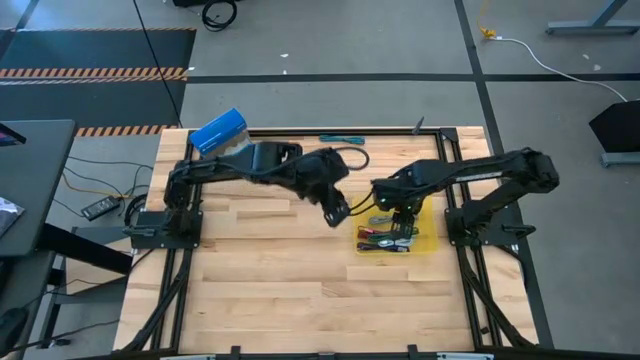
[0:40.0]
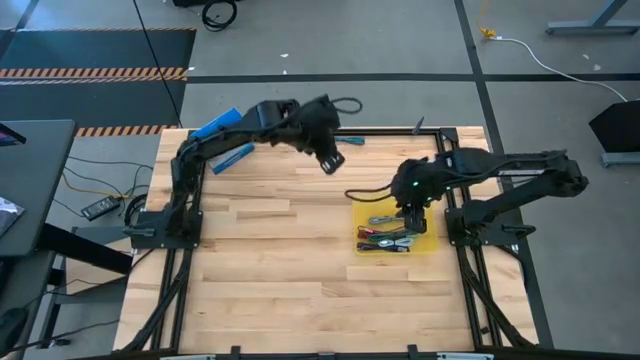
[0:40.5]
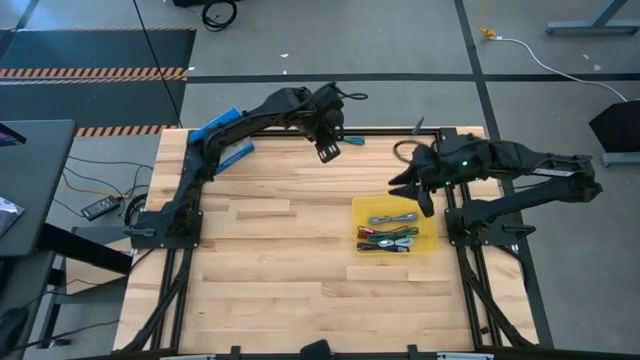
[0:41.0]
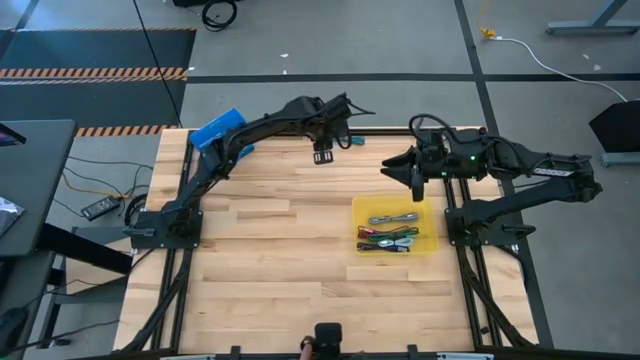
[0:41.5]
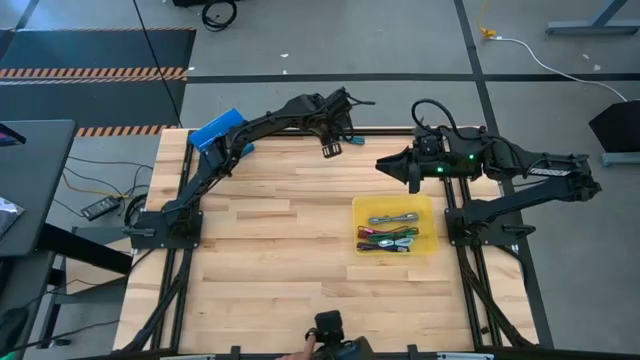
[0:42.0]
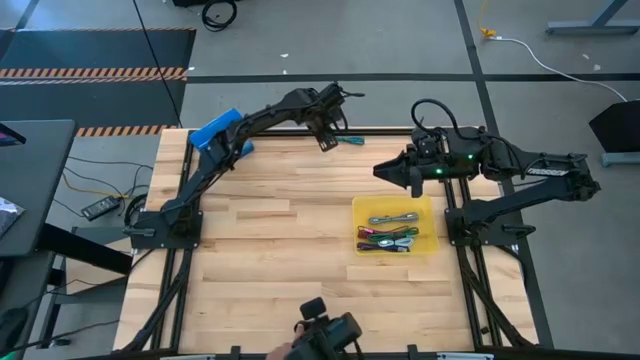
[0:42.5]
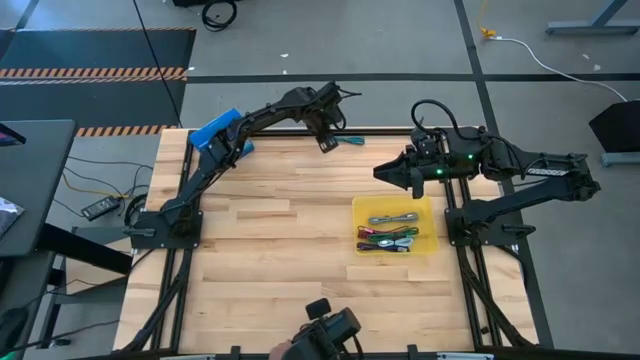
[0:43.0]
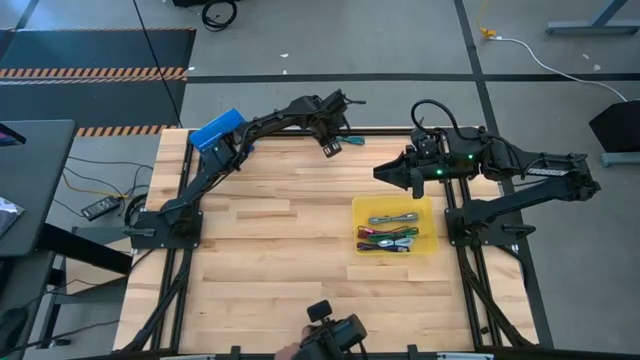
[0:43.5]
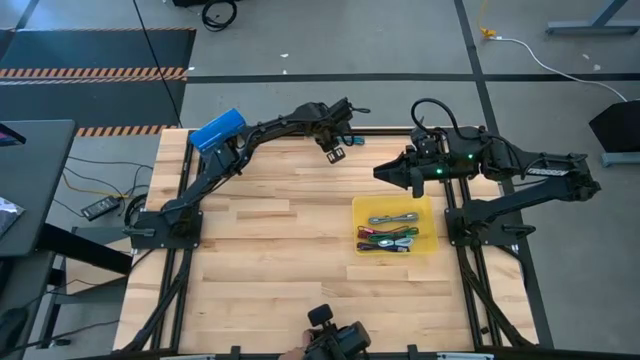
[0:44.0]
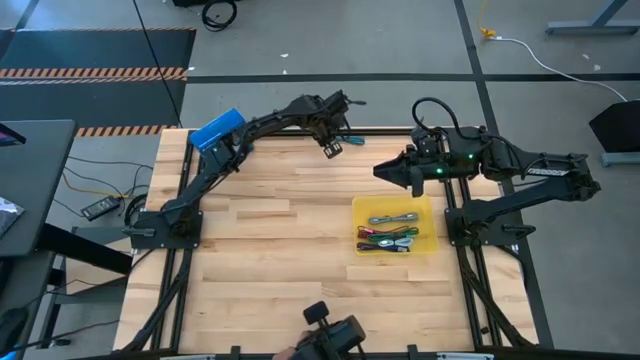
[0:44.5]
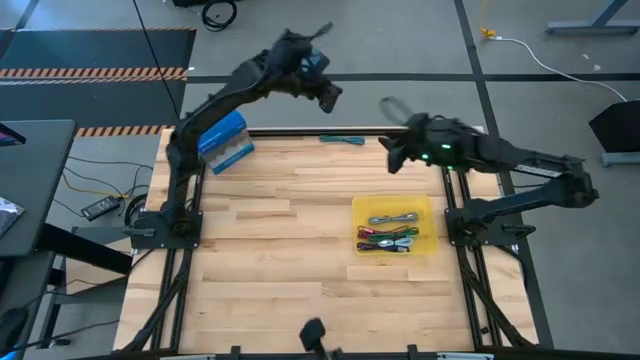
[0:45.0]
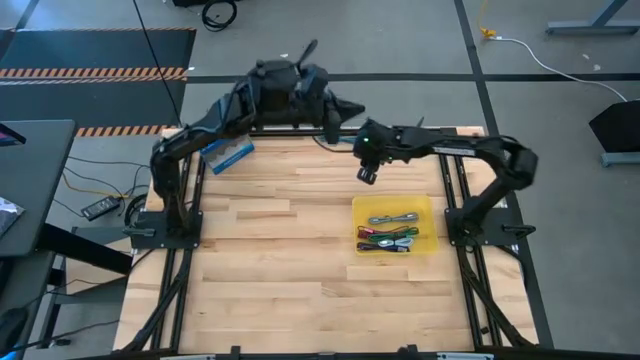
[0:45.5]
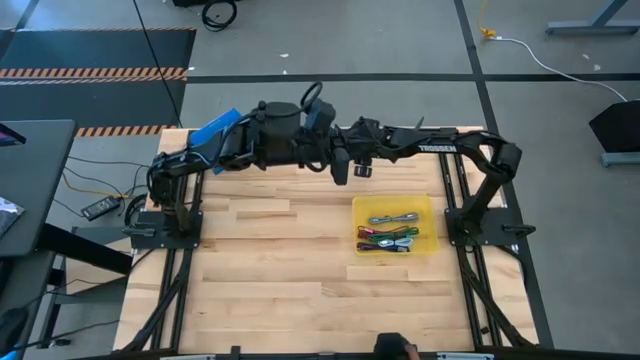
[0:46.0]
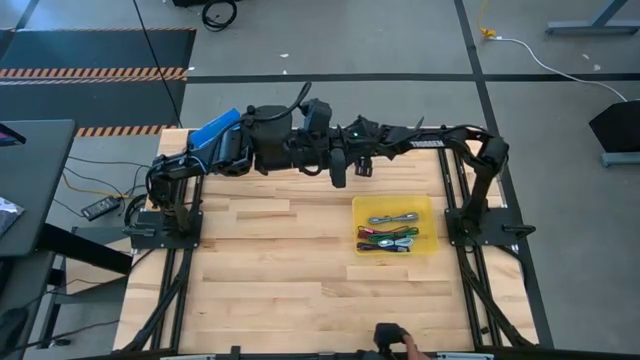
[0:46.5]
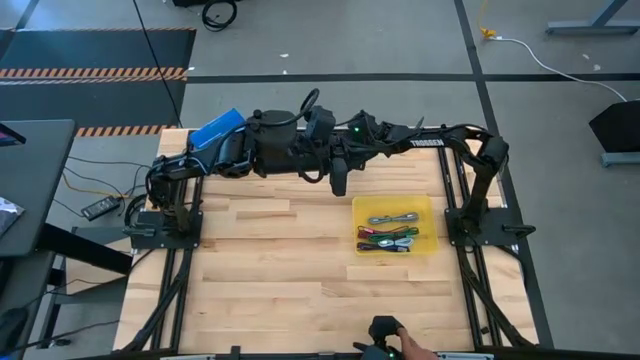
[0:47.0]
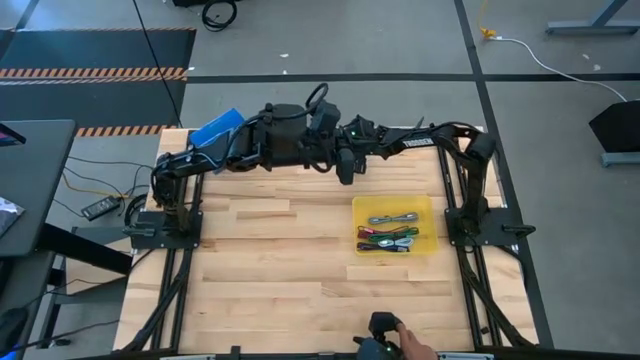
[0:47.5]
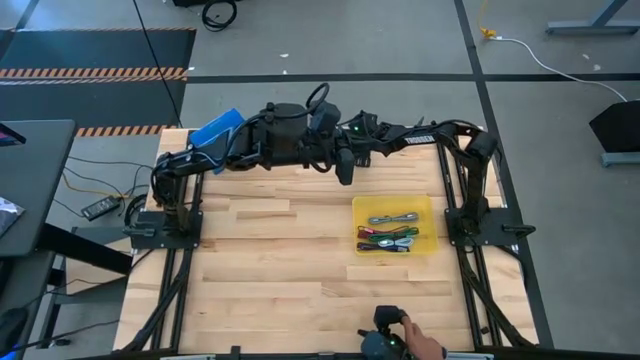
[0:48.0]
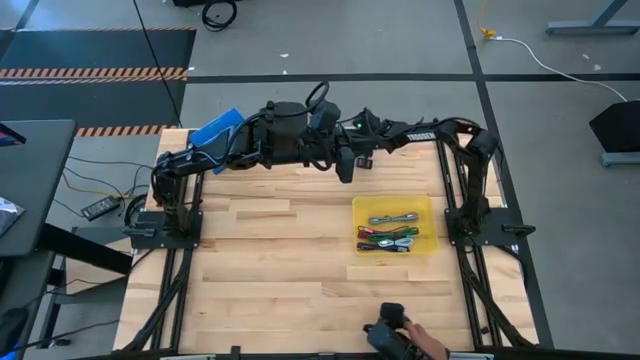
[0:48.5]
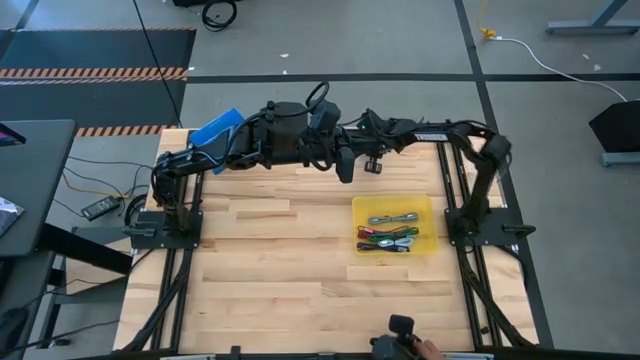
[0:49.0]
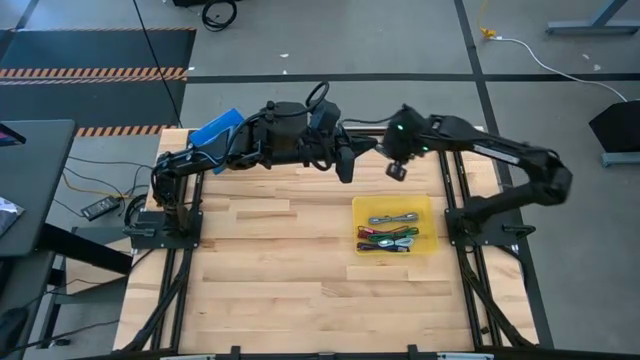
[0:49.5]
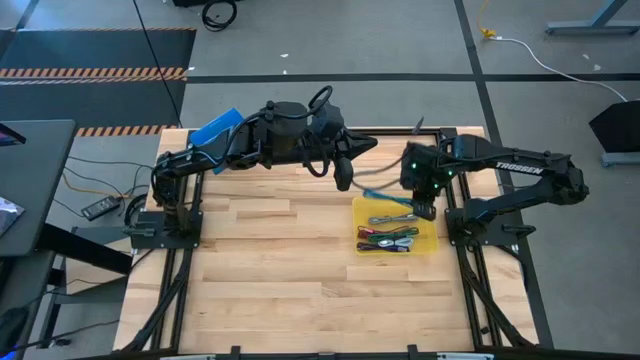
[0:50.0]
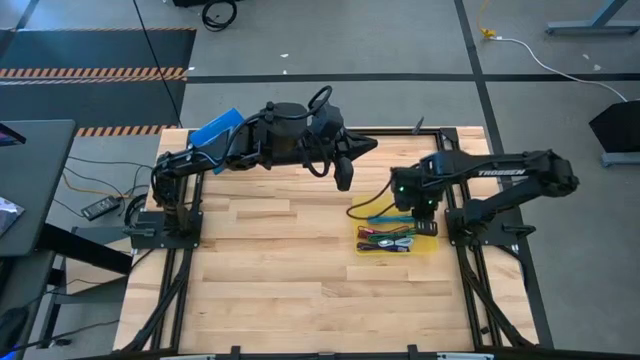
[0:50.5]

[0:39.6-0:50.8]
Task: Pick and place USB-C Cables
Put the blue charger cable into the yellow bin

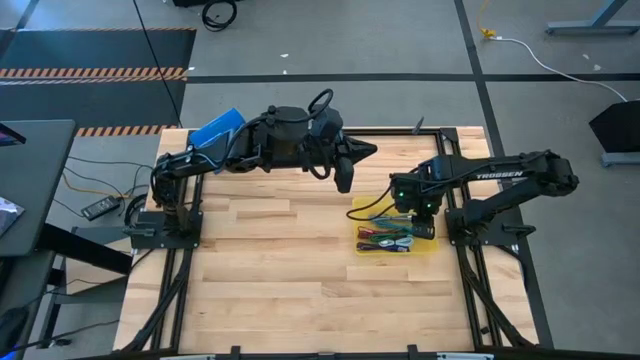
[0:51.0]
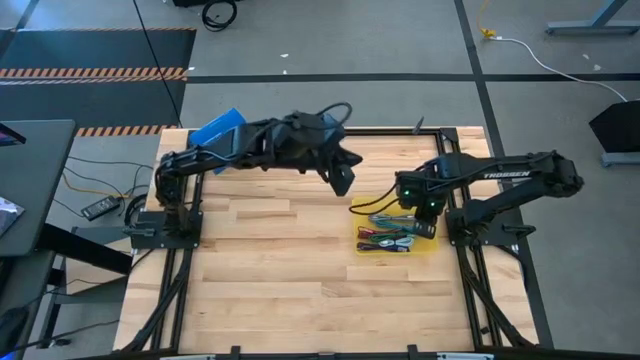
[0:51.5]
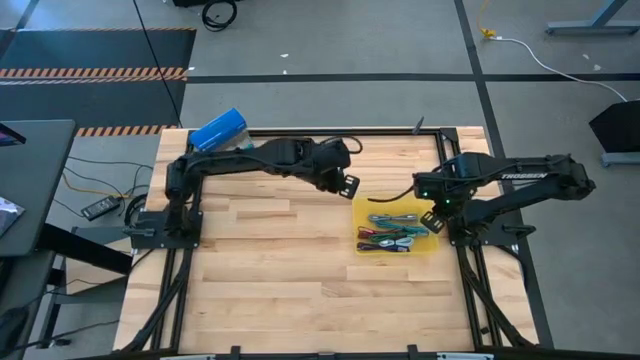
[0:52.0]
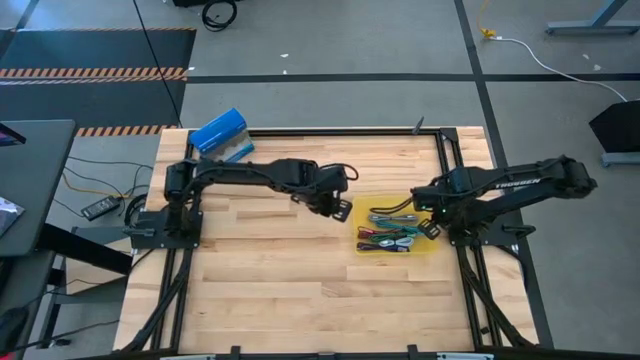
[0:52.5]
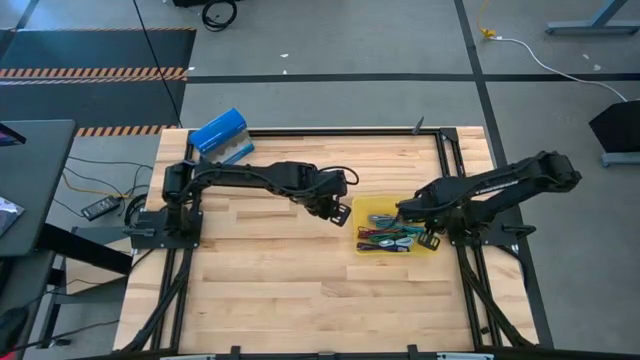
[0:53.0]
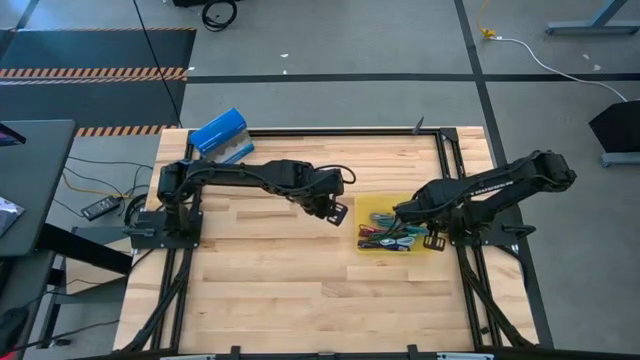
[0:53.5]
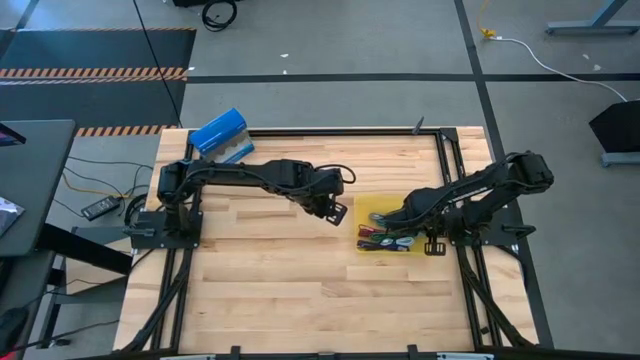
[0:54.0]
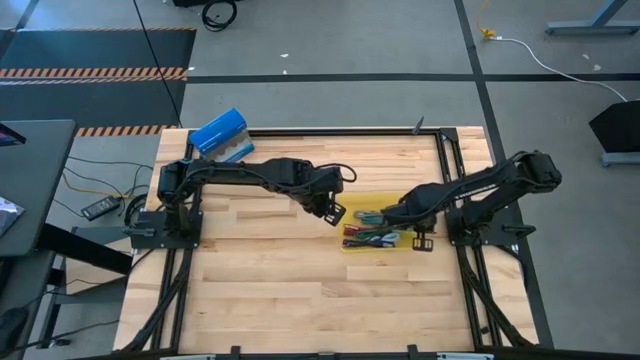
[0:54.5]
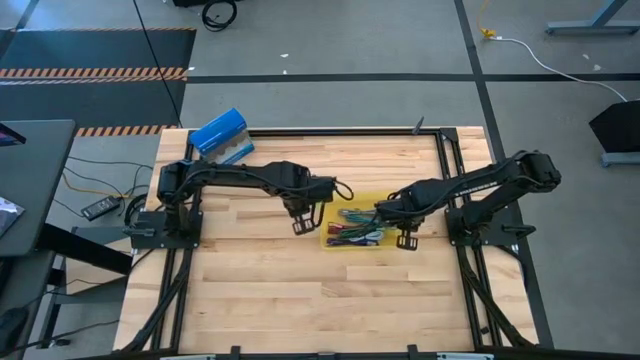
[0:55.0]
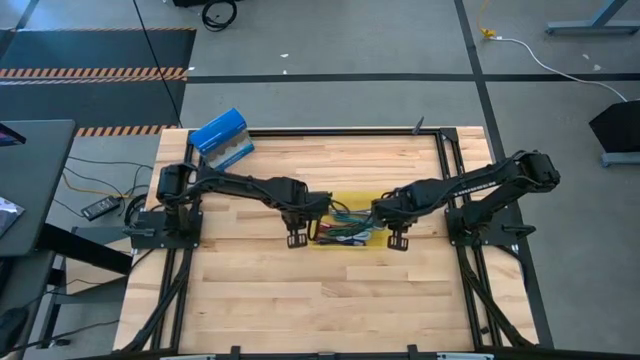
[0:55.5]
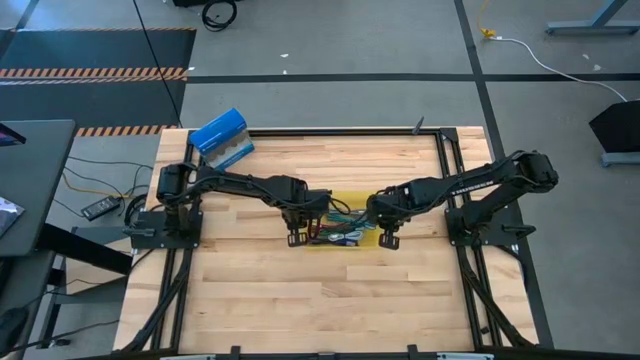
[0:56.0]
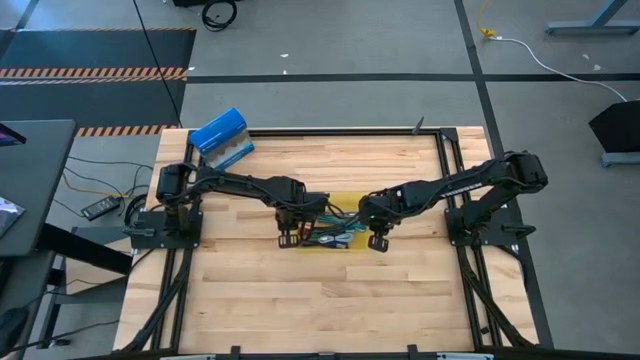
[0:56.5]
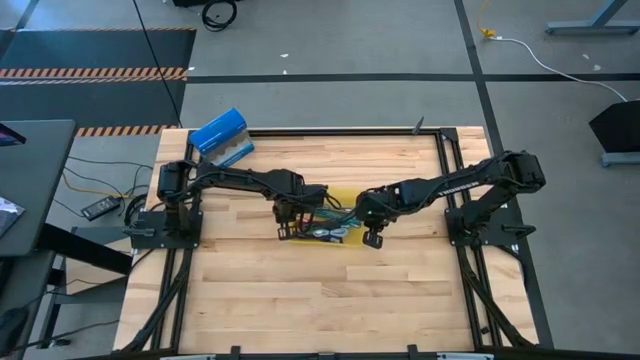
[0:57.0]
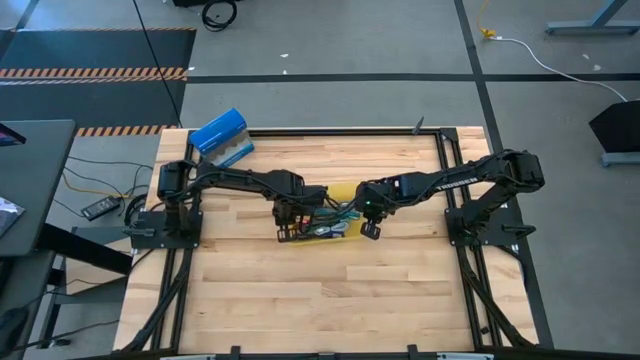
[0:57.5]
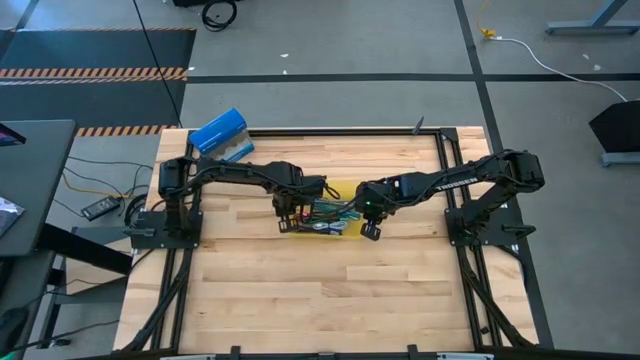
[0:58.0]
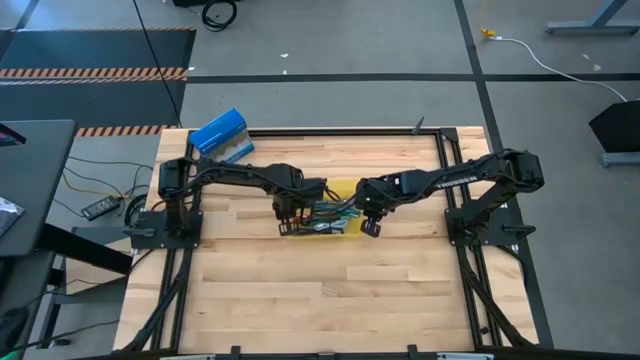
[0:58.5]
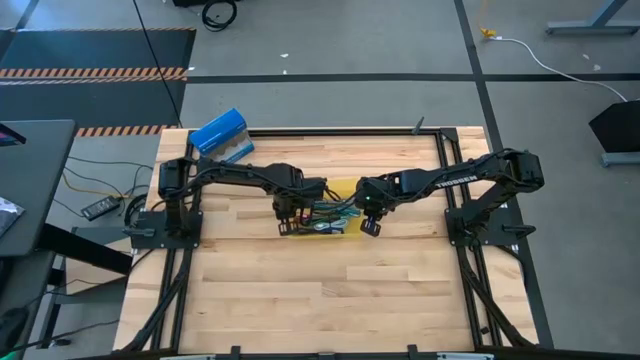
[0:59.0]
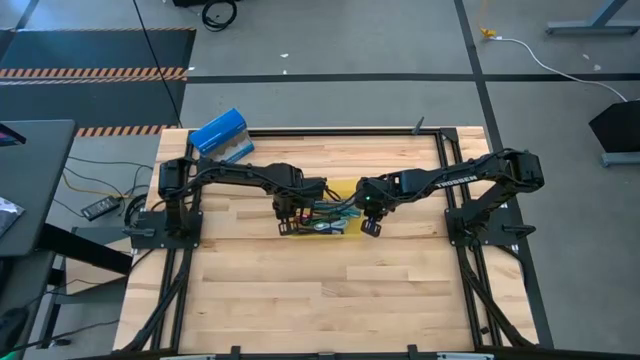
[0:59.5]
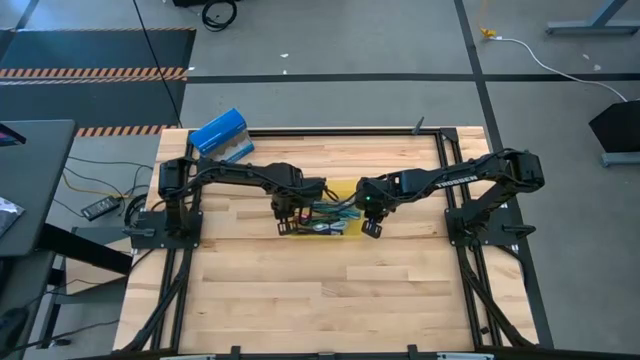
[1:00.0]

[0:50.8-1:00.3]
Move the yellow bin to the center of the table
